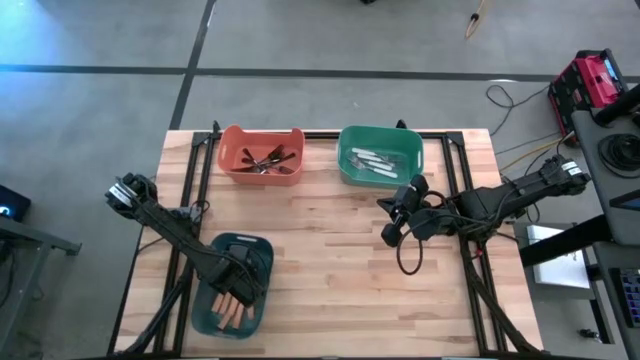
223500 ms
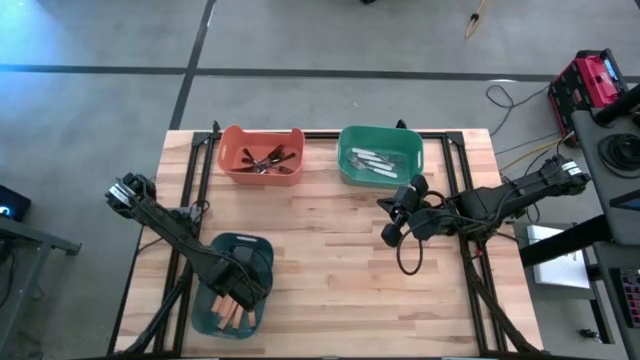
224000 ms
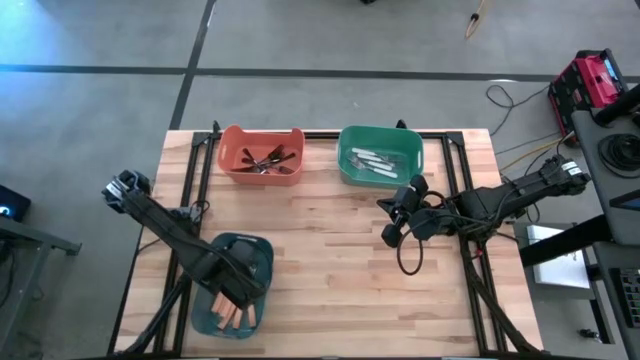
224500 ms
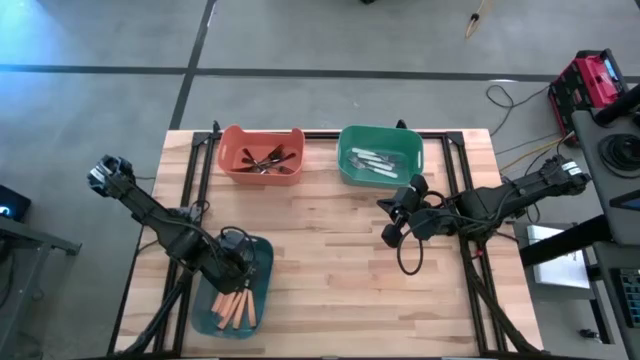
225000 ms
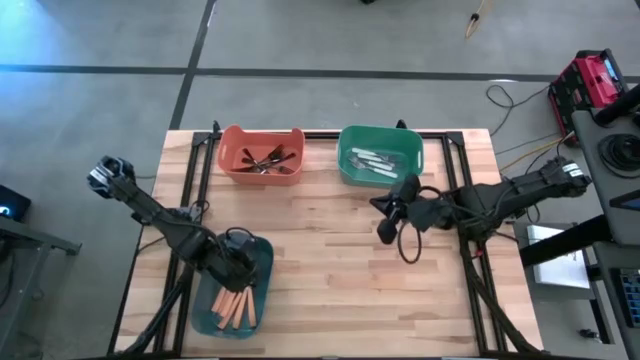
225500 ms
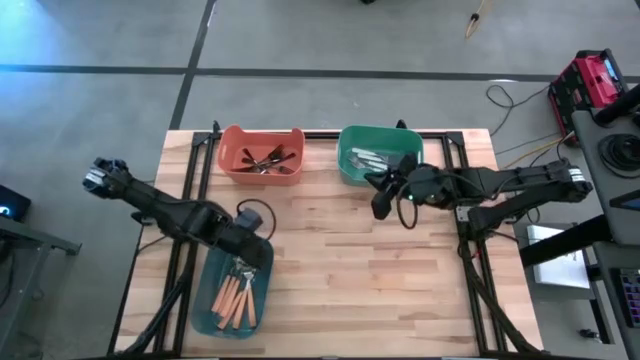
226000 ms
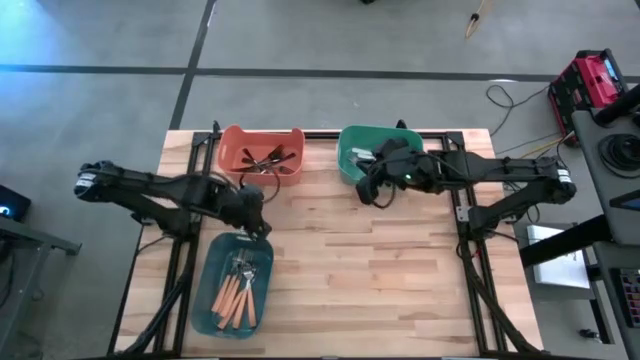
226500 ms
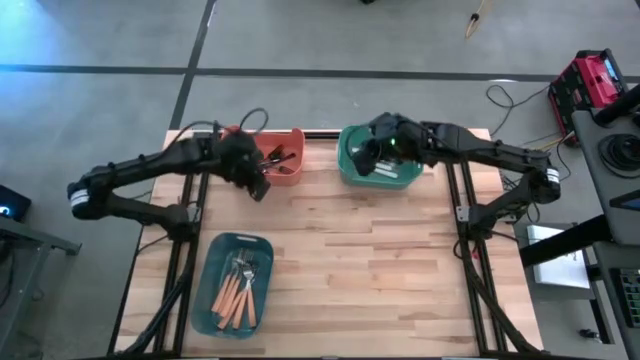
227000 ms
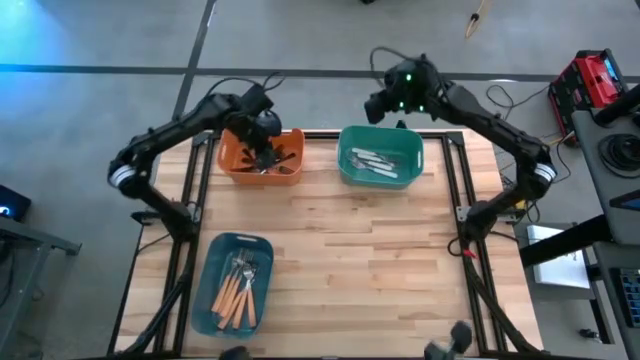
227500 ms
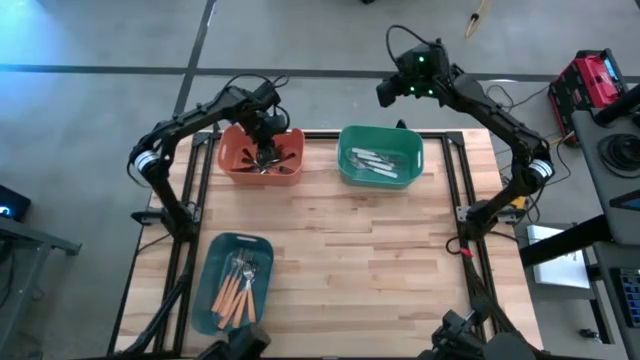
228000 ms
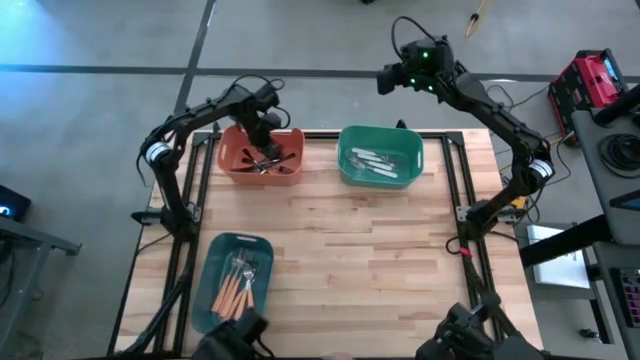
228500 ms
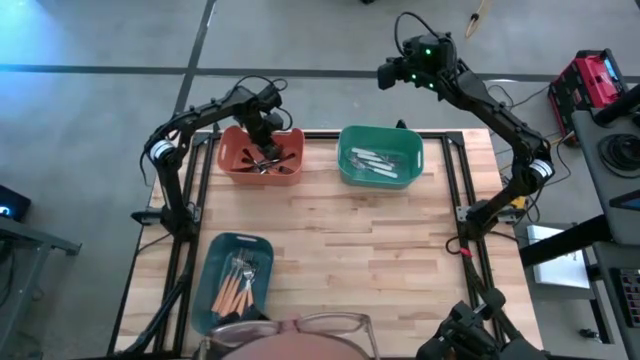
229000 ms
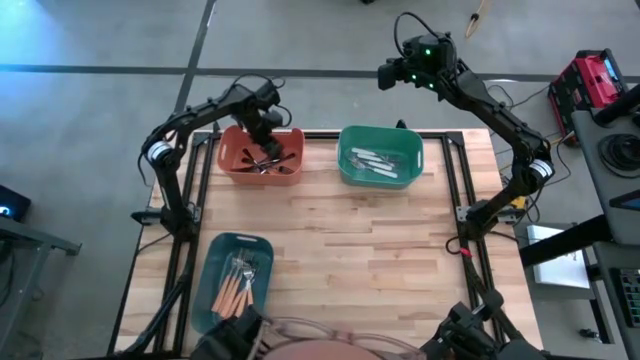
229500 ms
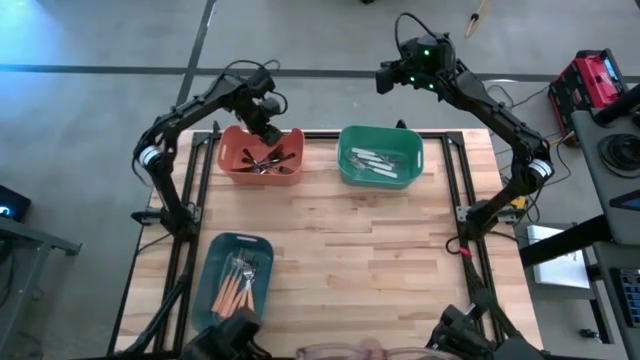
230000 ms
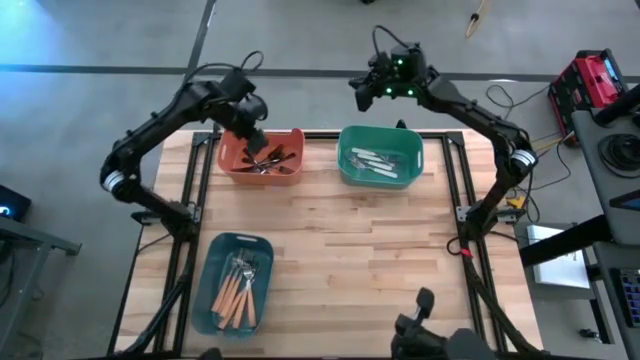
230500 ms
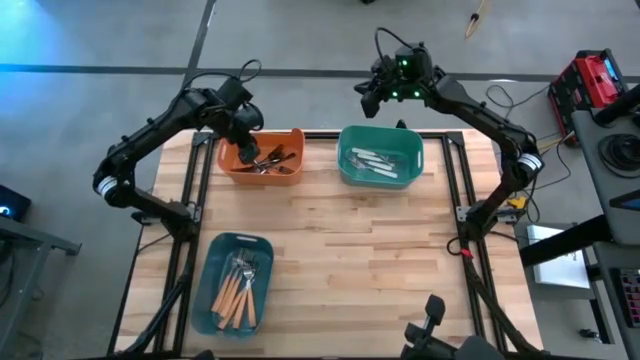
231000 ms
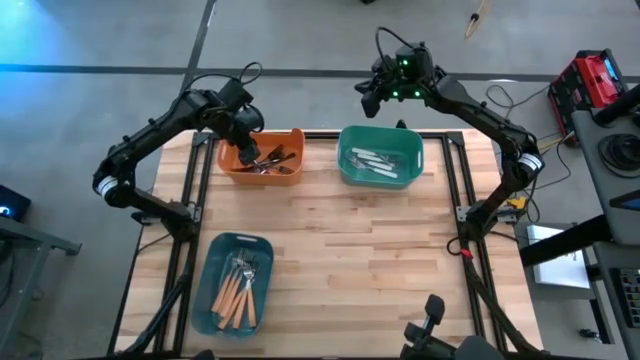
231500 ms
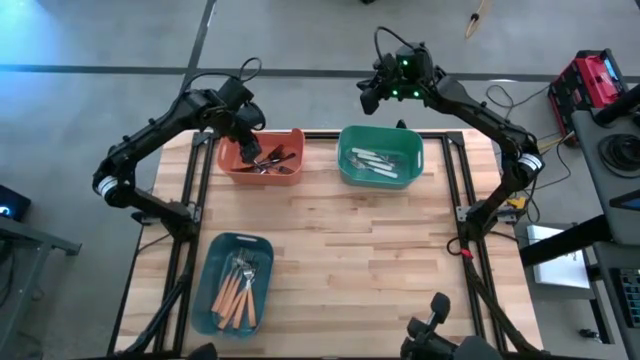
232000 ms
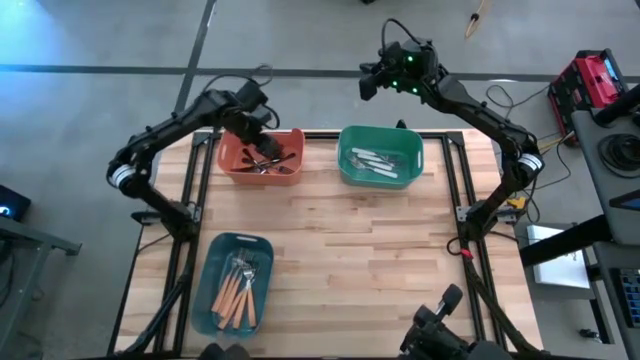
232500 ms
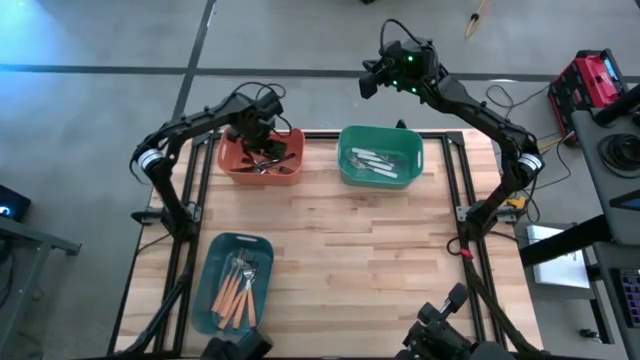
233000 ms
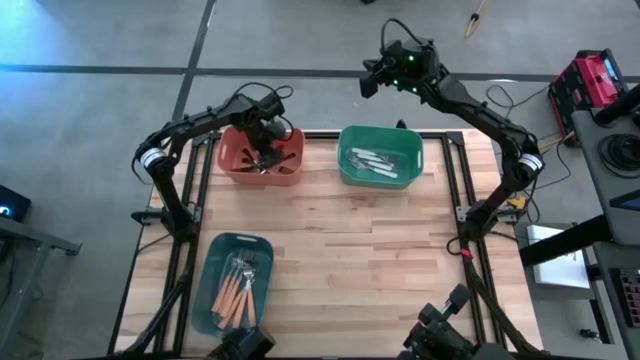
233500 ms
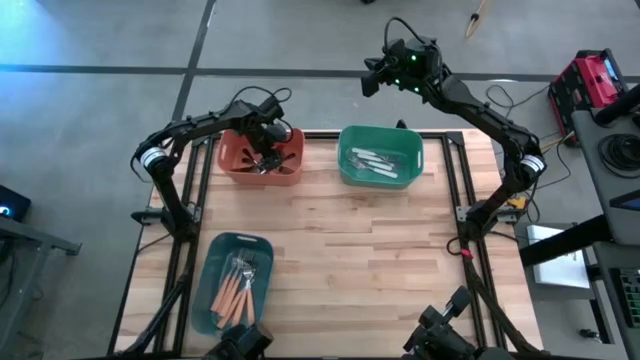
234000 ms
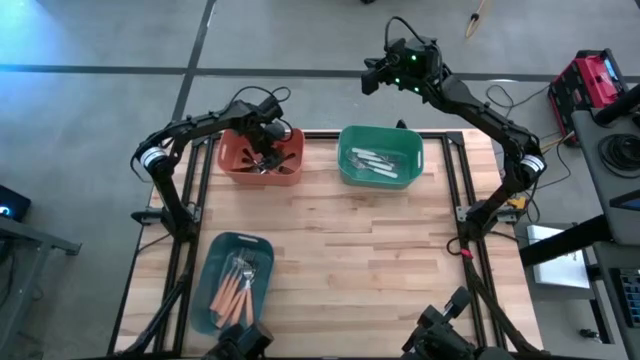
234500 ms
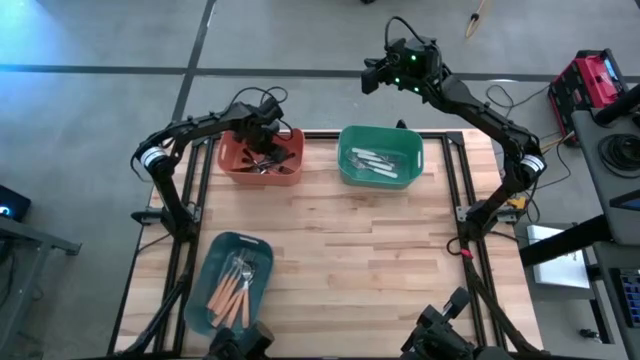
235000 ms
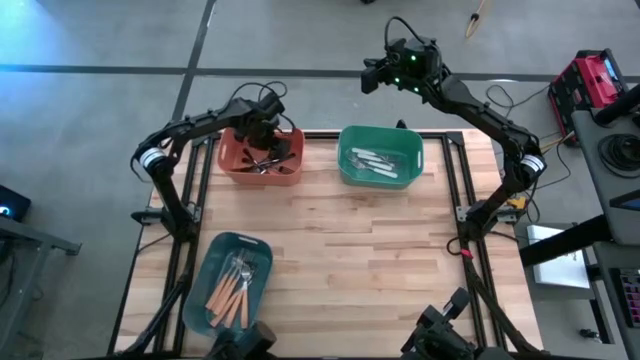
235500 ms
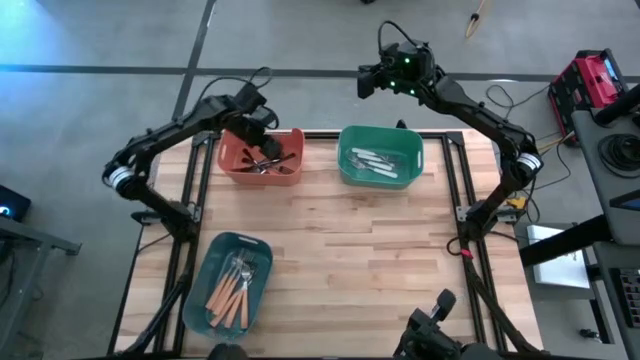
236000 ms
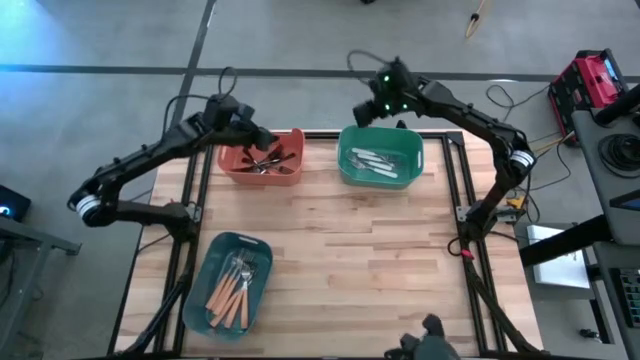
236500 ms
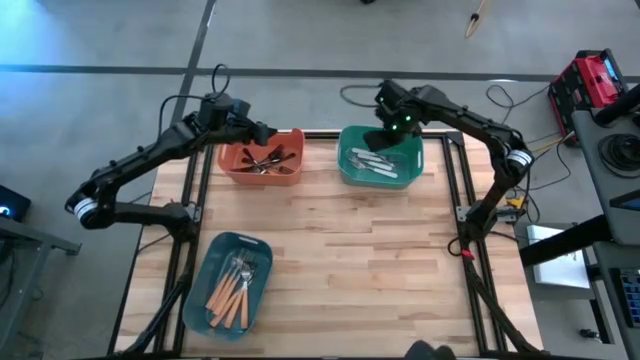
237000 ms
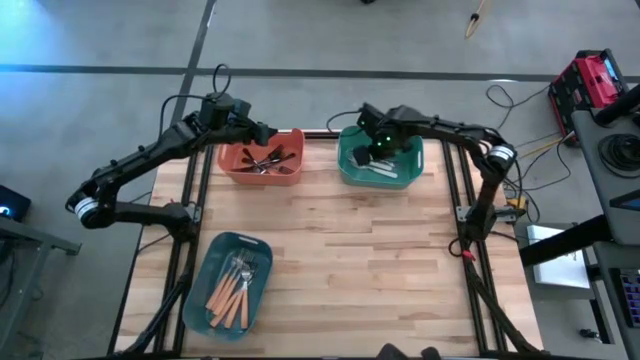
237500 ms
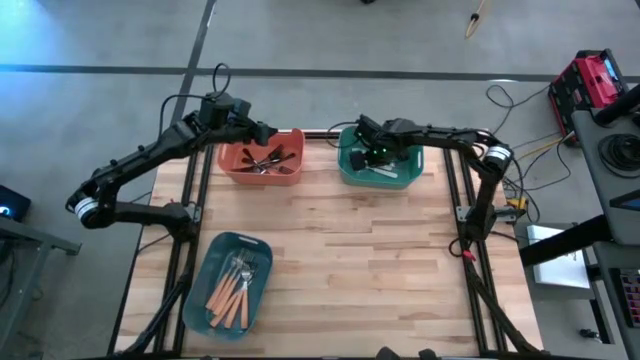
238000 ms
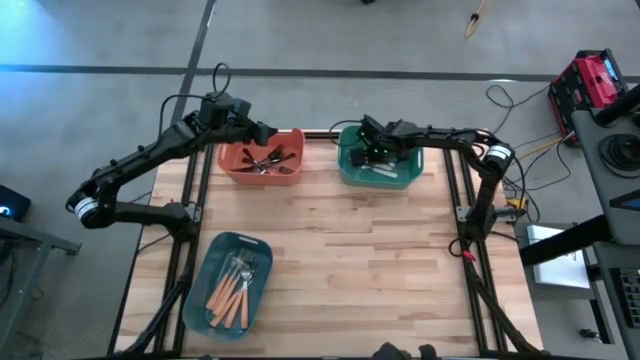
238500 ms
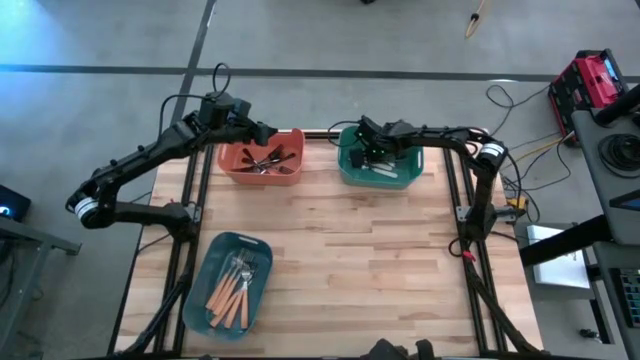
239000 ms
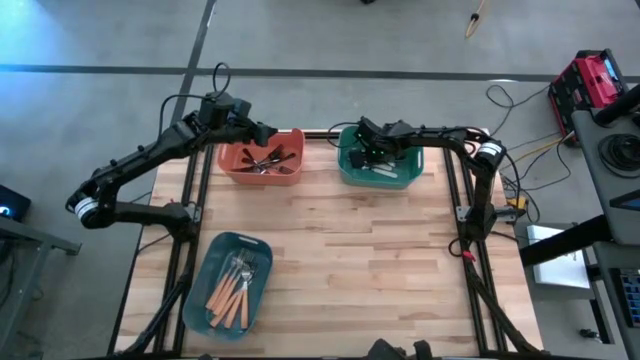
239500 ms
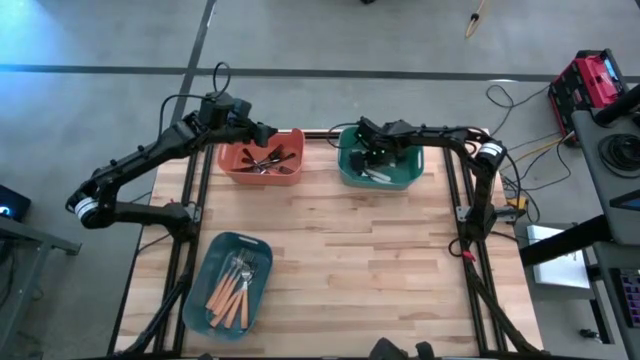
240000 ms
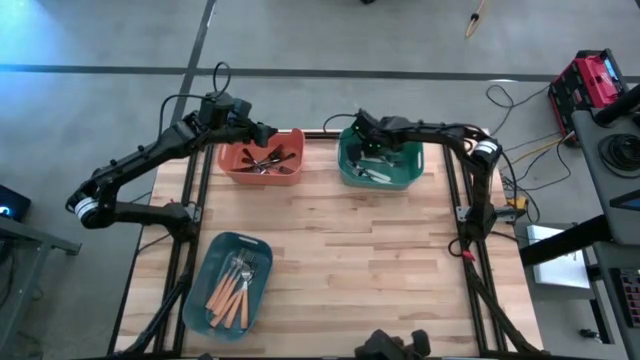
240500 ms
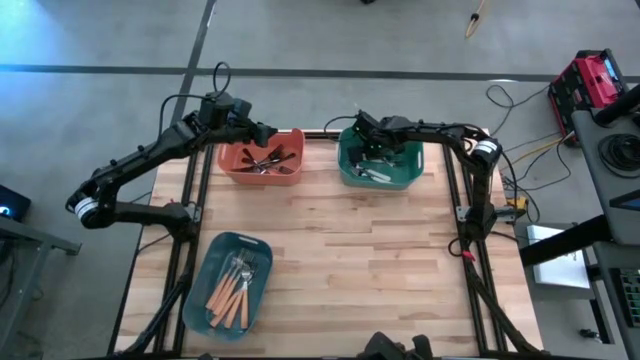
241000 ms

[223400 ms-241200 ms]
Task: Sort silverware by color (type)
Adjust the white forks in the green bin
